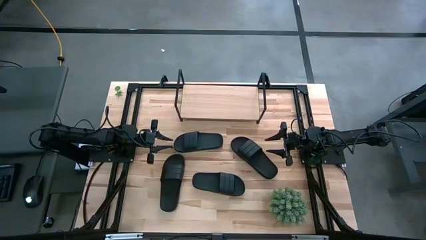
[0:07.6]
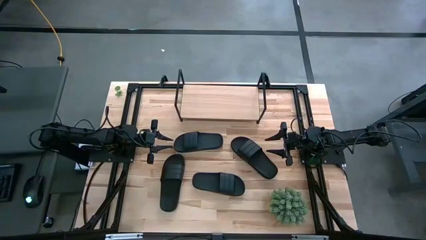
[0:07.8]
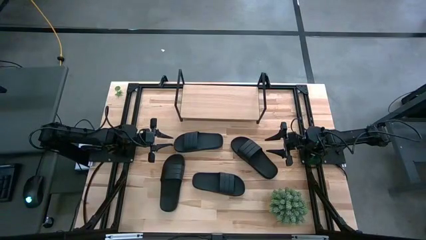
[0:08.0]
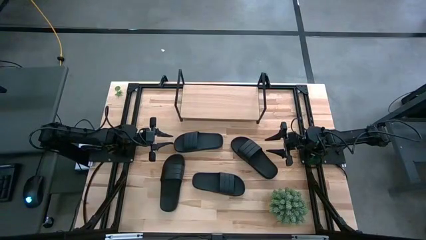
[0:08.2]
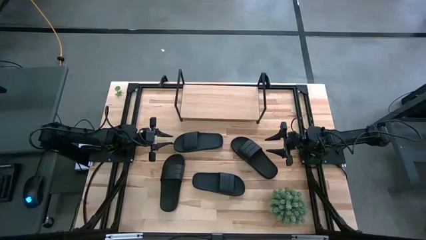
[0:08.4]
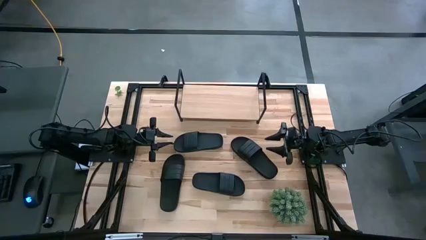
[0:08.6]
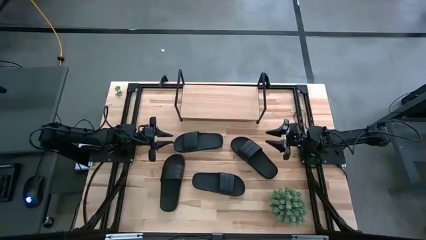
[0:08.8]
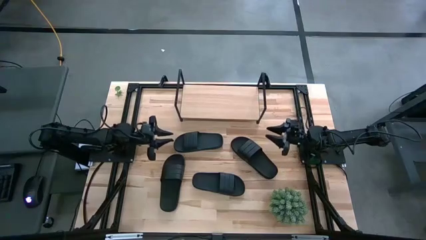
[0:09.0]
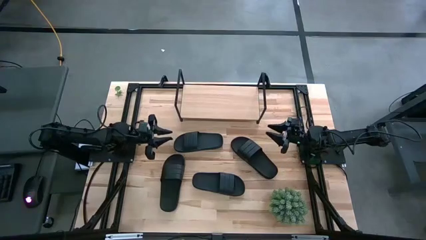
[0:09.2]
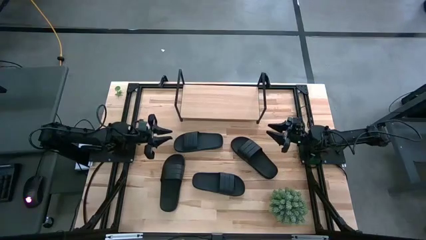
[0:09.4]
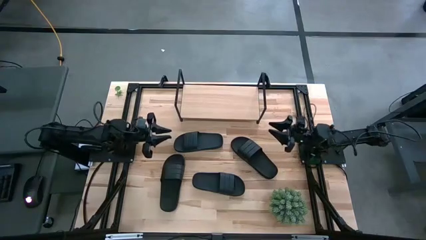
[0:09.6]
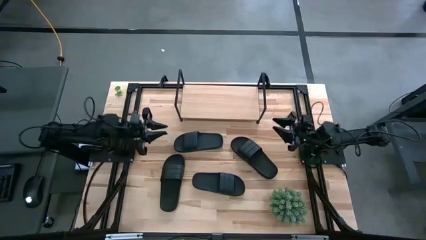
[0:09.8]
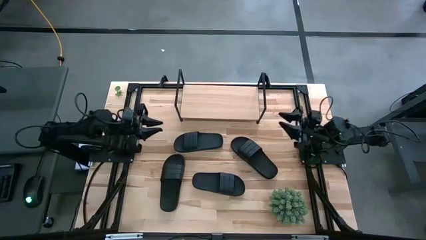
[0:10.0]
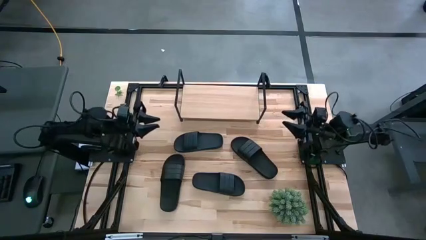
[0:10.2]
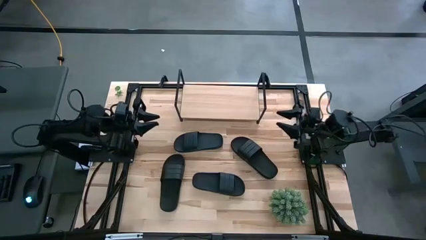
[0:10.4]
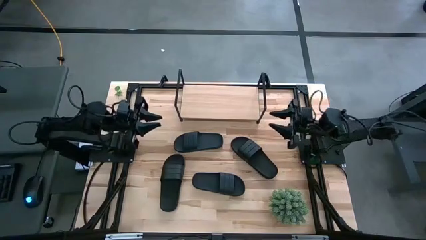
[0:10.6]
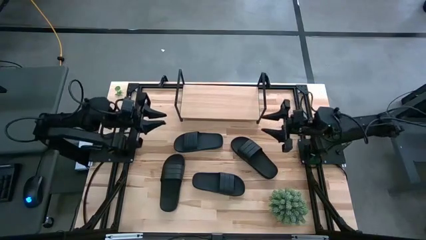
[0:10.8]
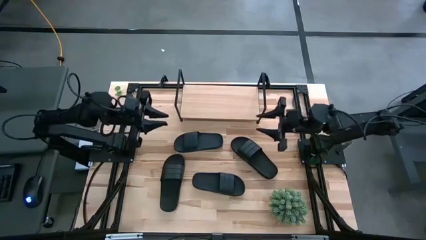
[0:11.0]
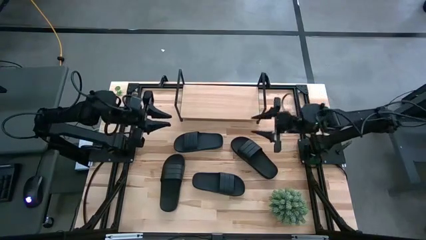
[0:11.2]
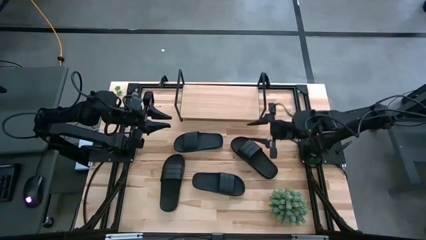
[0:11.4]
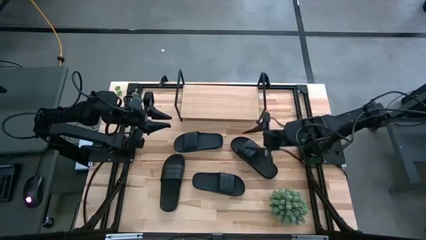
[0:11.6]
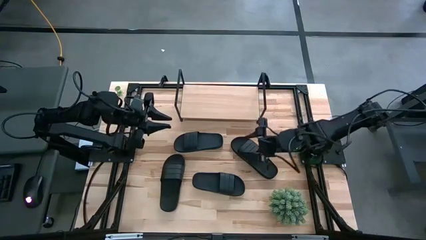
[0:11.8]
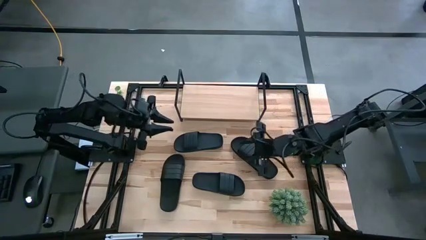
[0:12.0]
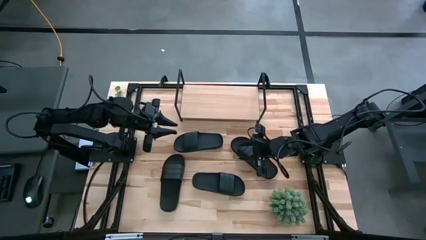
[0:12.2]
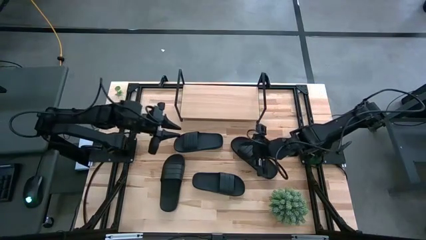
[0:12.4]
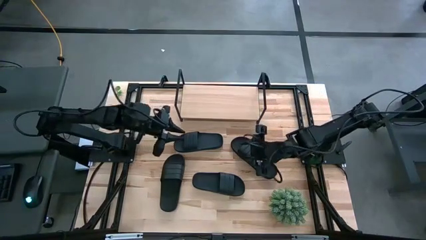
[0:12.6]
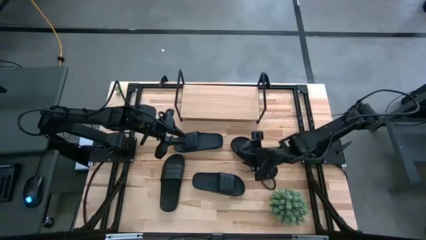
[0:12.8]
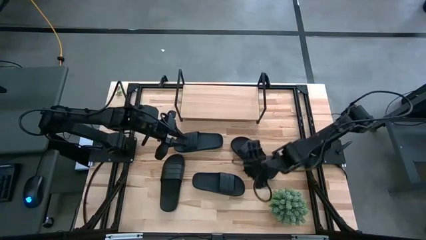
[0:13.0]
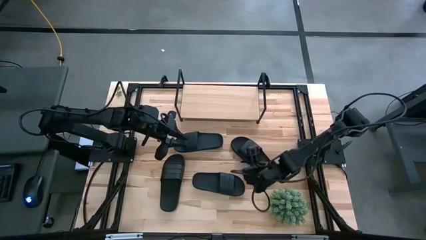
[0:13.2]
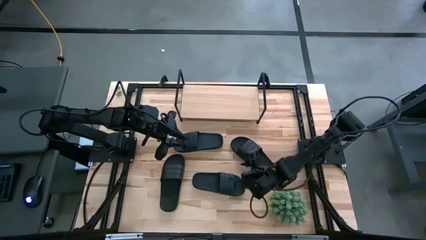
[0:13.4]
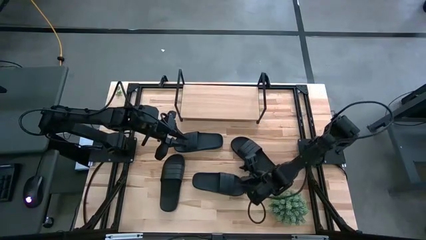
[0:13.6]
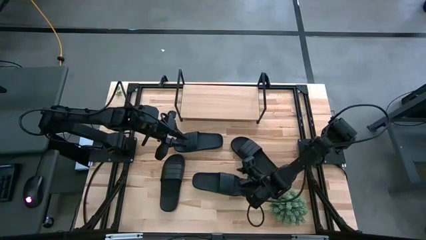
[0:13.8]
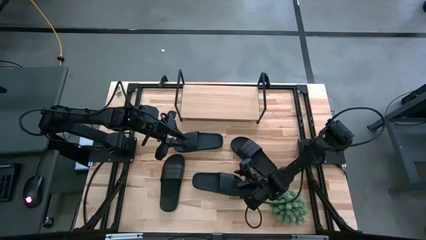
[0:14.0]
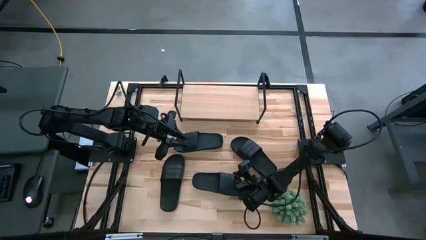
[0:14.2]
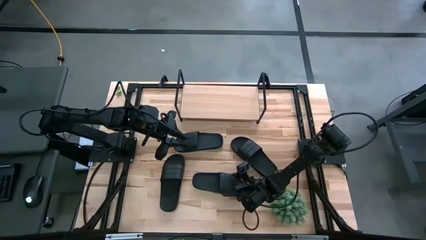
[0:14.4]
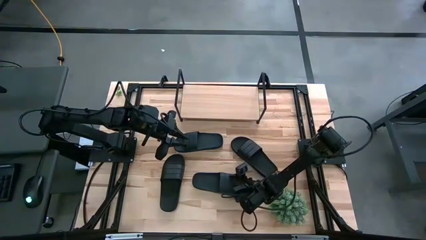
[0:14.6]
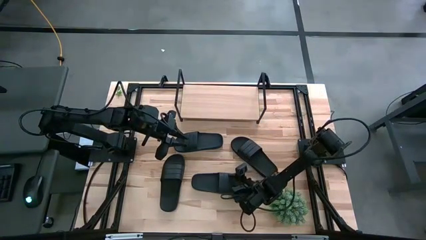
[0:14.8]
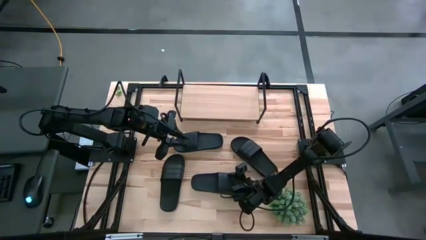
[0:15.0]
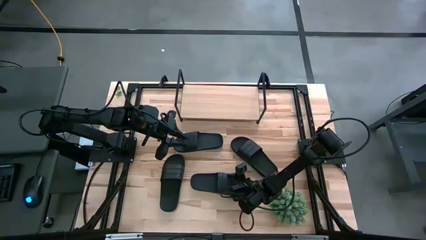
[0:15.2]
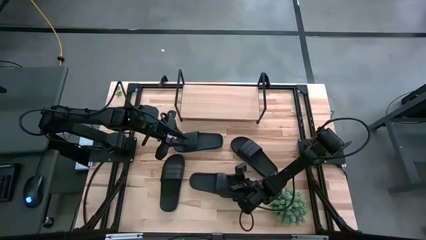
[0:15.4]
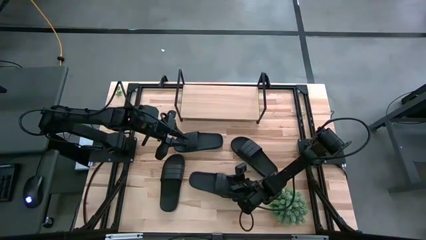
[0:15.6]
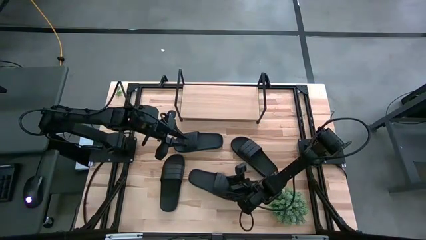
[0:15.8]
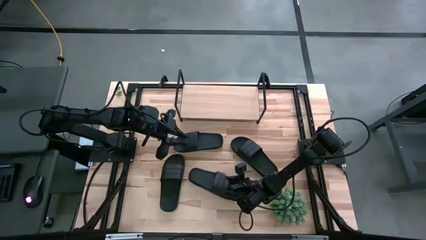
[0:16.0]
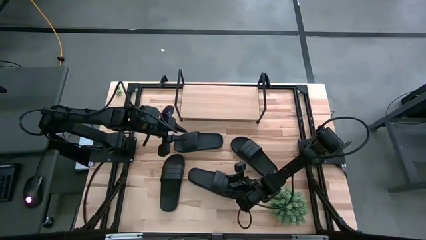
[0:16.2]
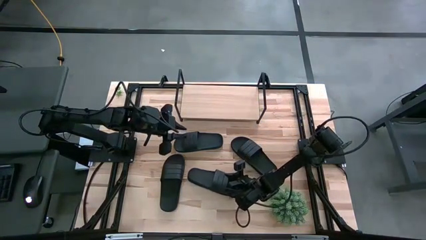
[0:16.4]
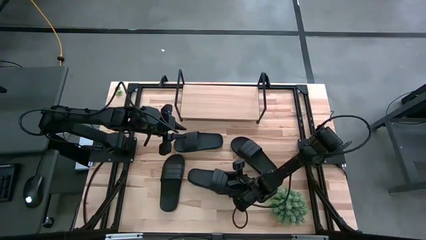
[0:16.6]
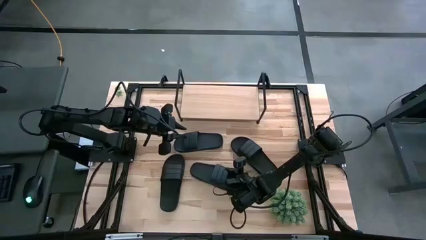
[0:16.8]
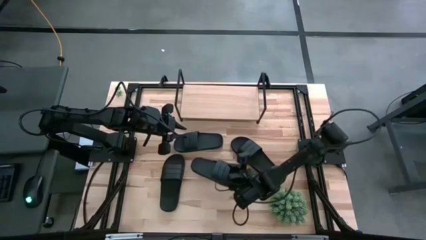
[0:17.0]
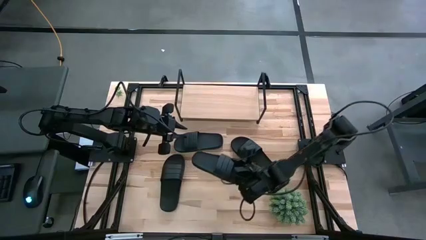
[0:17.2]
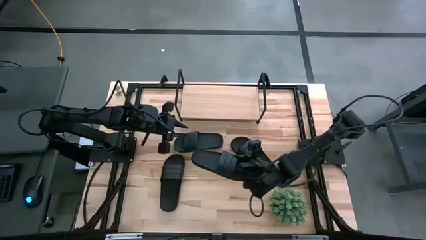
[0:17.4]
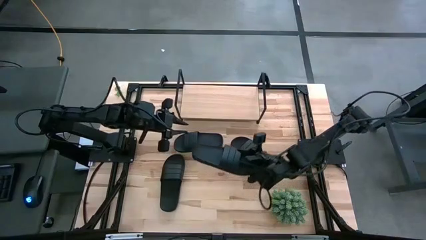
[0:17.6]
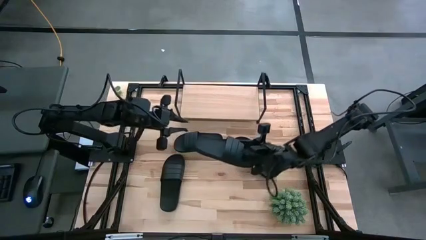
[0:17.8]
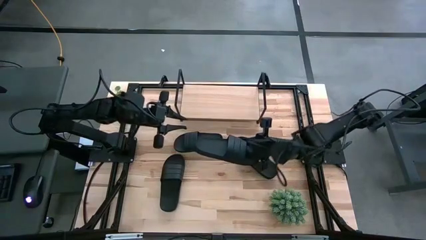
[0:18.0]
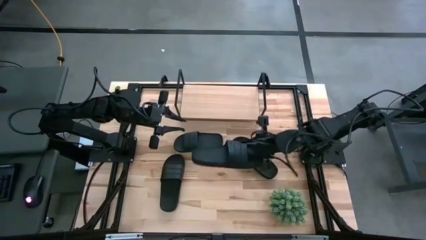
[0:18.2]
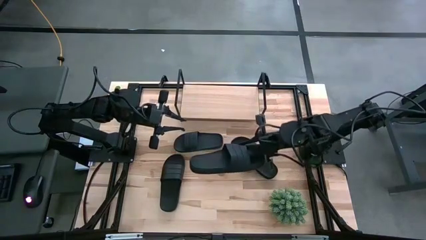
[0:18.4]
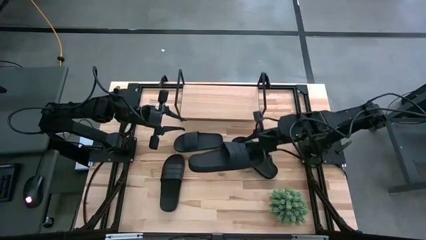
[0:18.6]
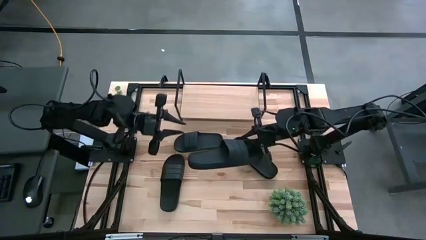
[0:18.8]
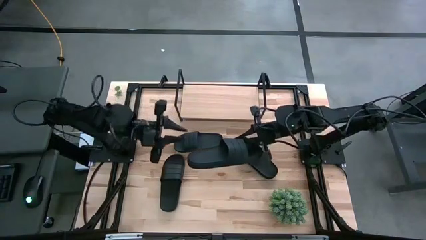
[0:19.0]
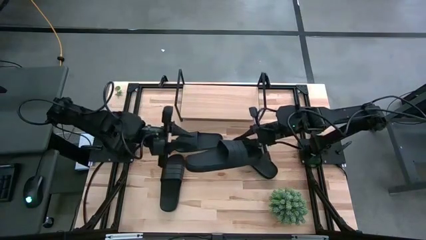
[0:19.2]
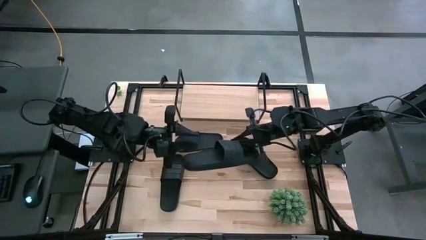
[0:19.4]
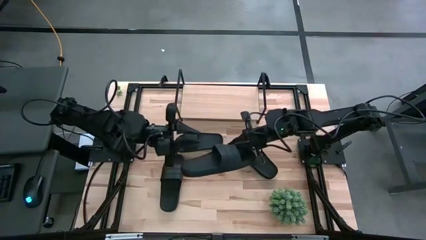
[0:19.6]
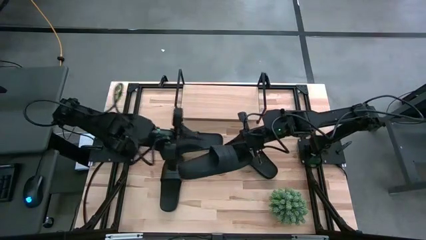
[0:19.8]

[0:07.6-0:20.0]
Task: Pick and place slides into the shelf
Put the black slipper on the shelf
